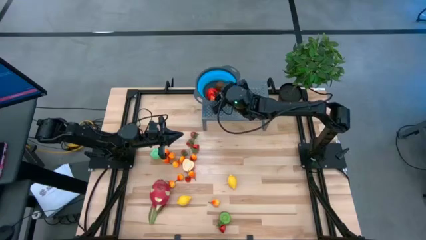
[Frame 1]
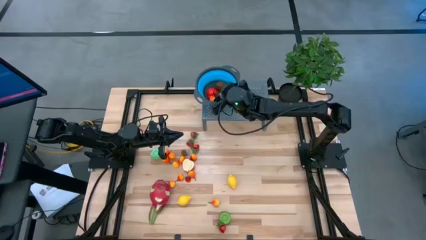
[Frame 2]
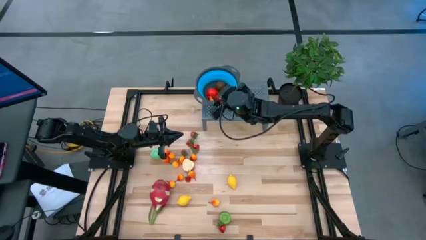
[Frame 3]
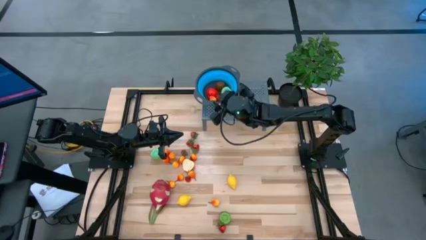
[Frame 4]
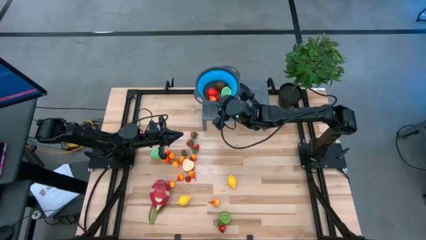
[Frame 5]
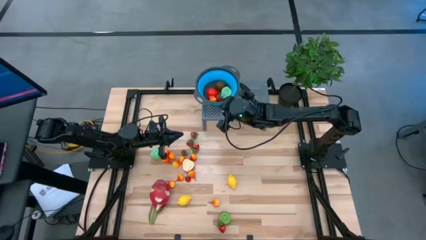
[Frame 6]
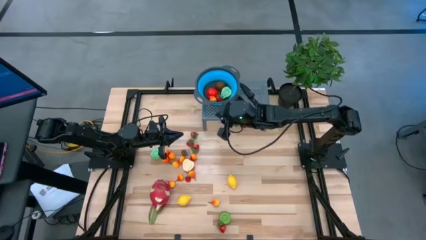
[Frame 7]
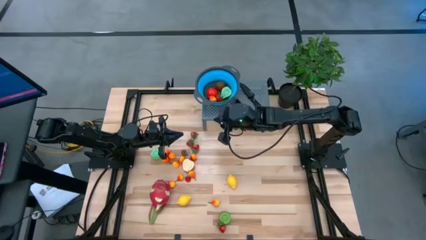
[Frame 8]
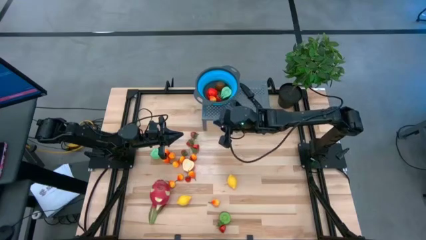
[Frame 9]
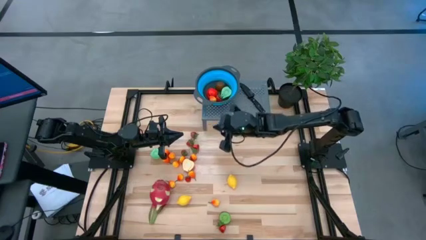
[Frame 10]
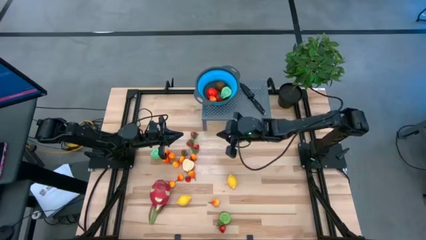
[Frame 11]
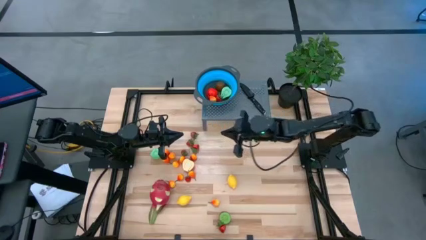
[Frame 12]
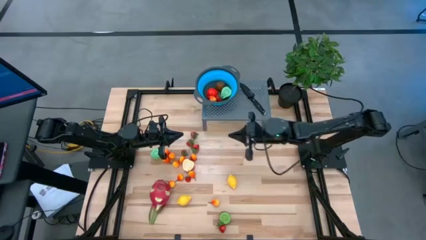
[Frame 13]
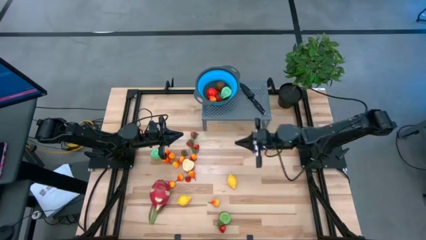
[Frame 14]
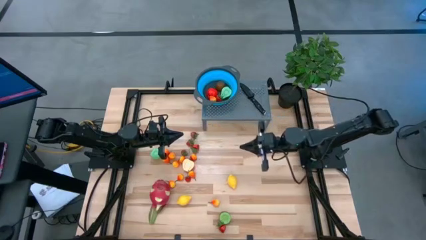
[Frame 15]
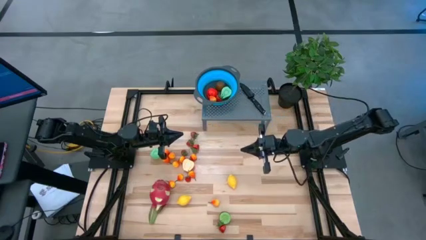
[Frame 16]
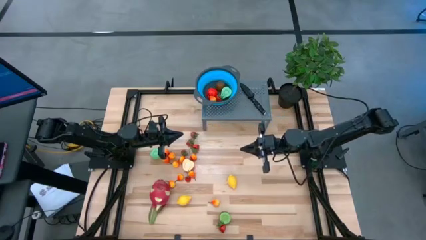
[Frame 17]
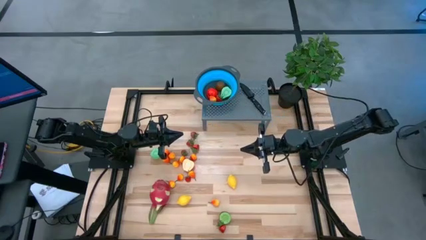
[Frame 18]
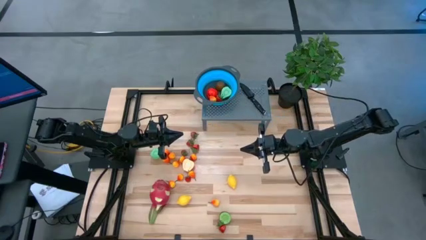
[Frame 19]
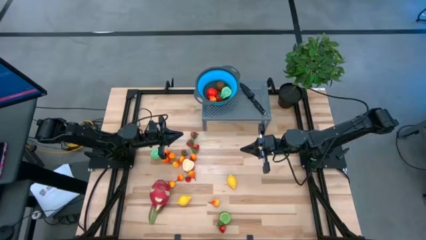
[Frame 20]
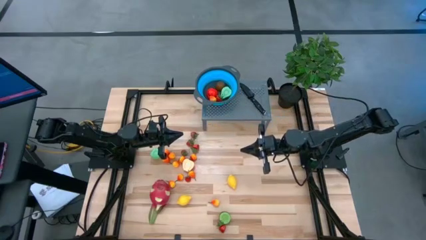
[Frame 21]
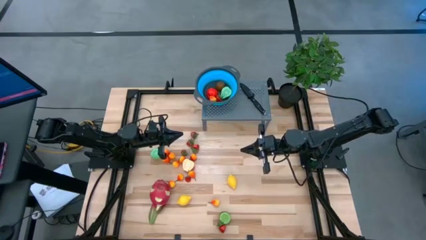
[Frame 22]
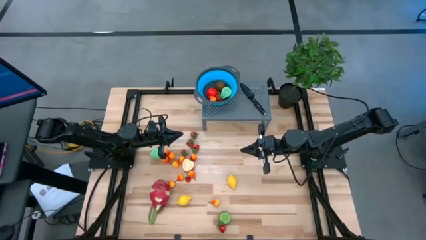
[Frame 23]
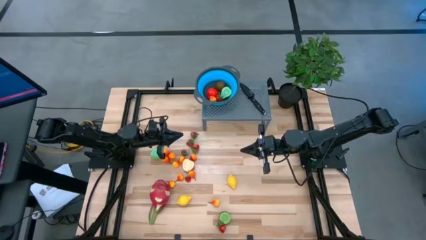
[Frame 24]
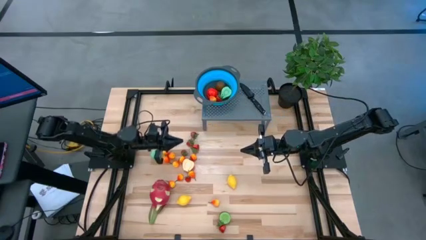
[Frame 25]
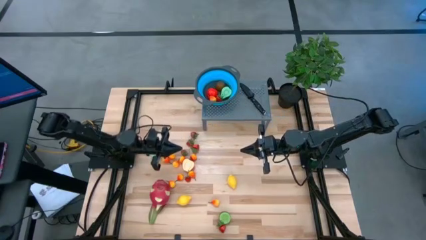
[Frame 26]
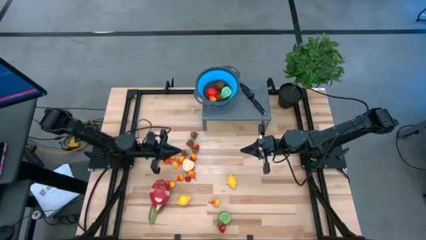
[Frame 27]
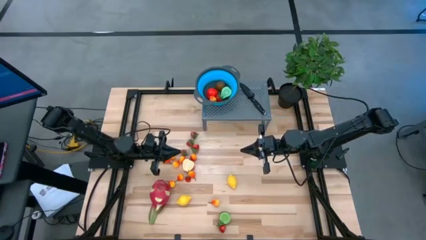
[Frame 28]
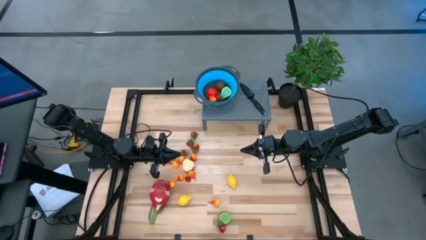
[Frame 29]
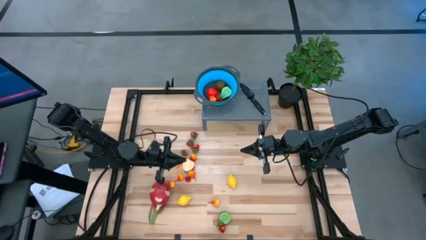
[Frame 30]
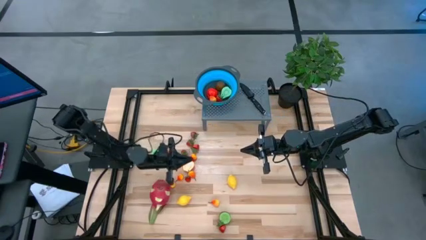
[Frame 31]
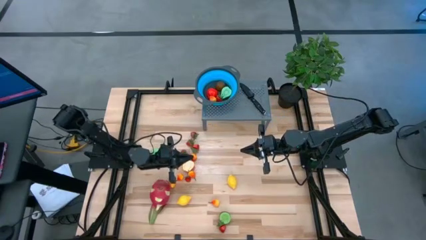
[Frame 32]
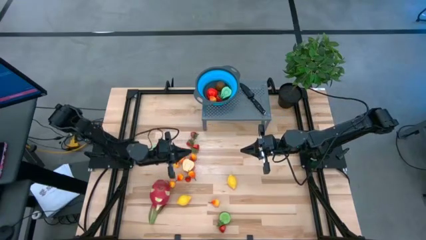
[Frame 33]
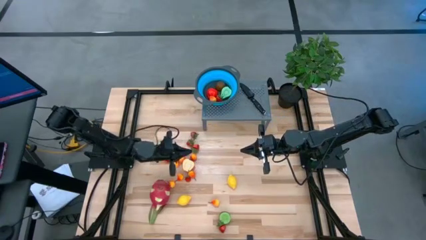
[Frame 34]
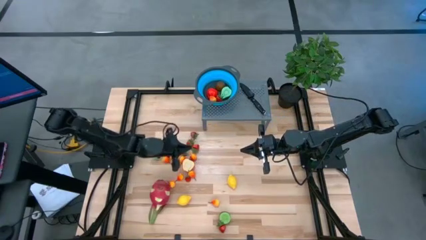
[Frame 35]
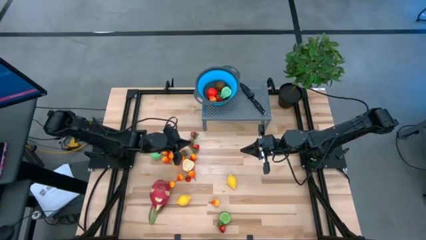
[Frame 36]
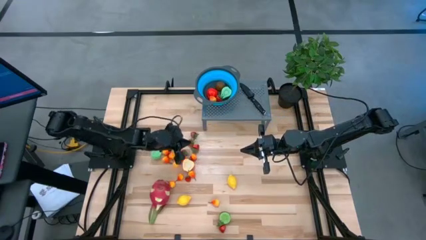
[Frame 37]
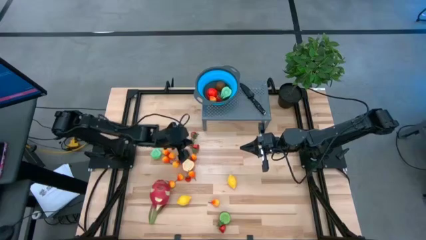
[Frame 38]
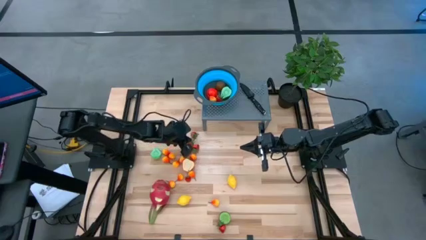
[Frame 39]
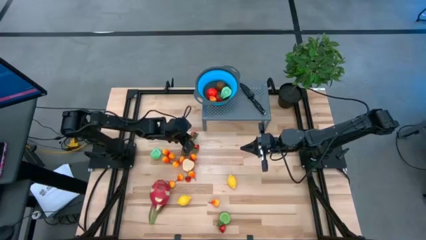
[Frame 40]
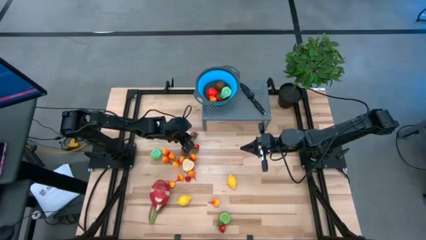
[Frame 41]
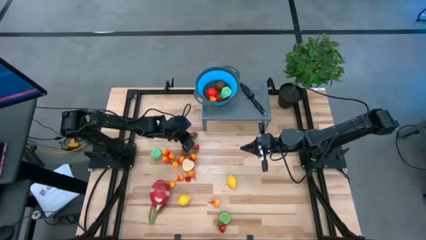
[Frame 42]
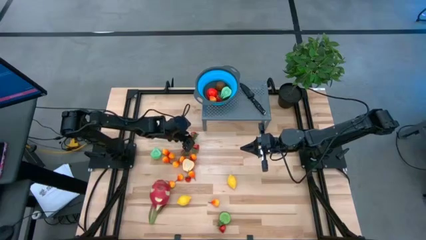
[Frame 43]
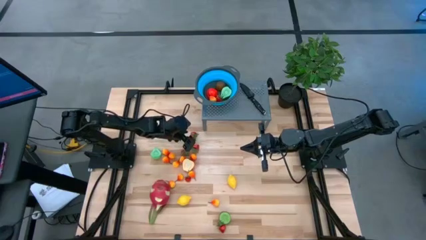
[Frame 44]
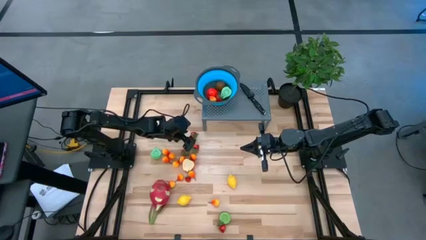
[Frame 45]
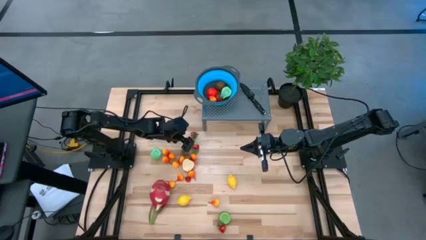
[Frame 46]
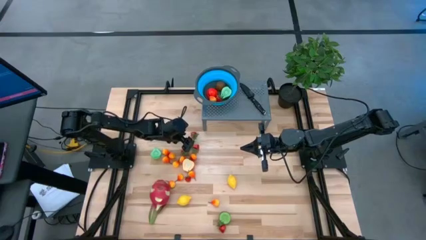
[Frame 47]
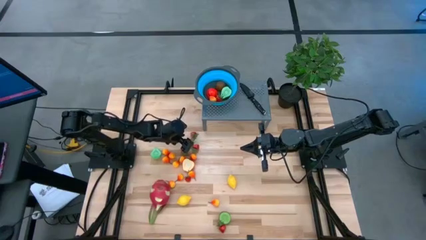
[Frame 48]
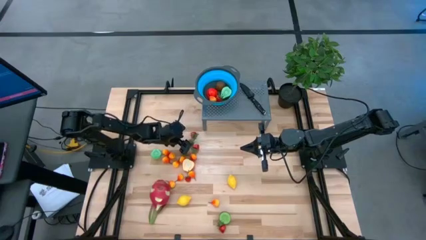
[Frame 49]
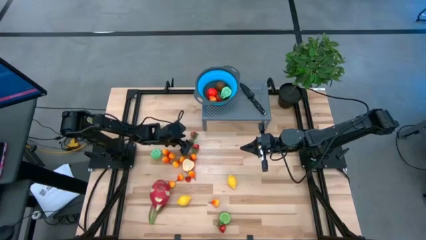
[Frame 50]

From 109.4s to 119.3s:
Task: Pick & Place Fruit
Put the strawberry into the strainer bowl

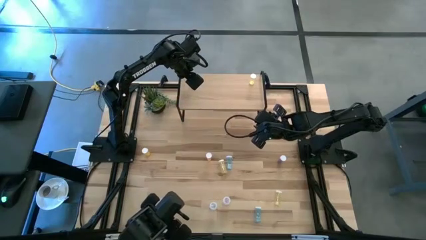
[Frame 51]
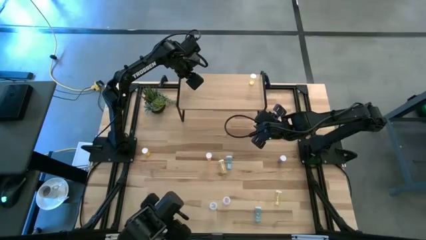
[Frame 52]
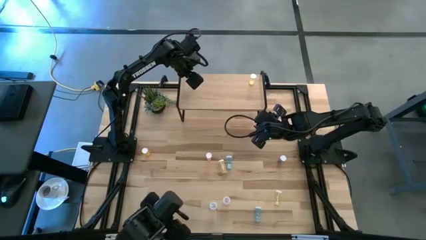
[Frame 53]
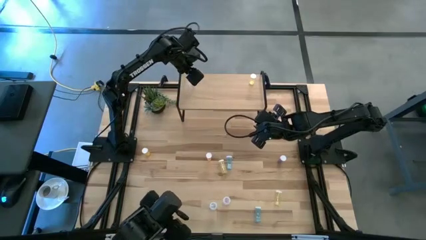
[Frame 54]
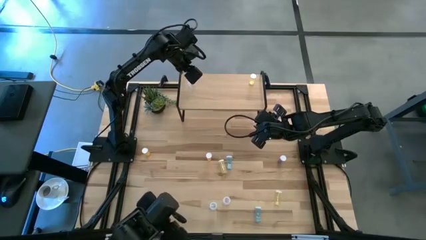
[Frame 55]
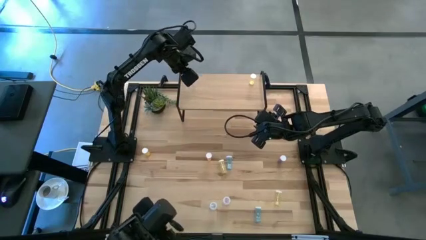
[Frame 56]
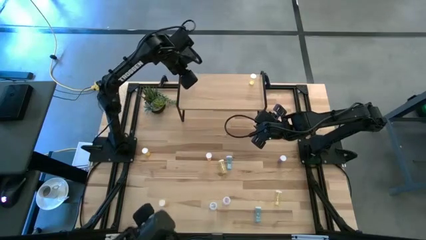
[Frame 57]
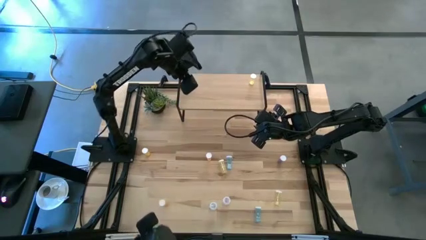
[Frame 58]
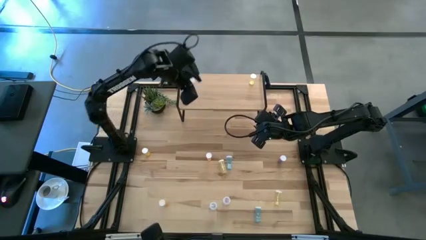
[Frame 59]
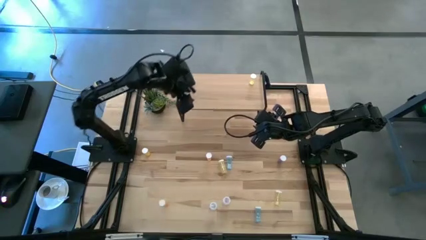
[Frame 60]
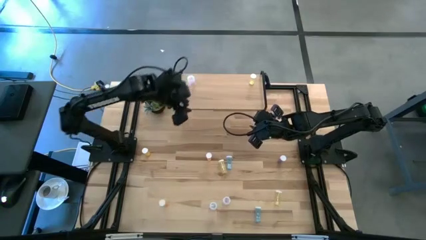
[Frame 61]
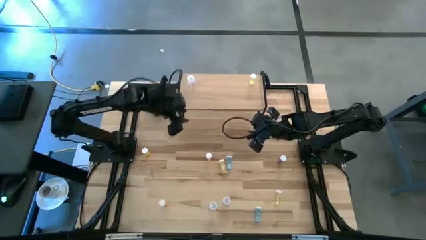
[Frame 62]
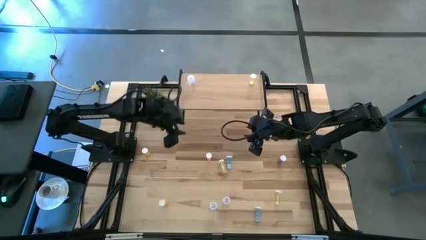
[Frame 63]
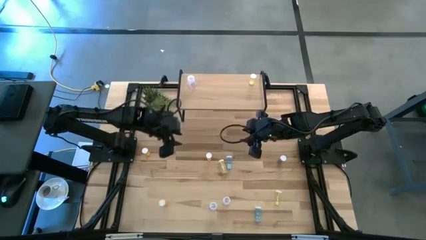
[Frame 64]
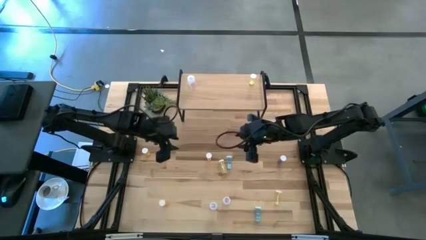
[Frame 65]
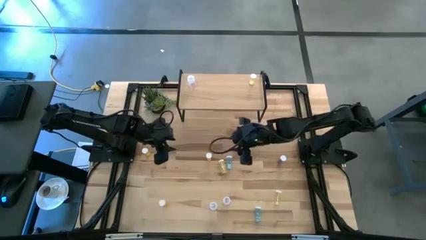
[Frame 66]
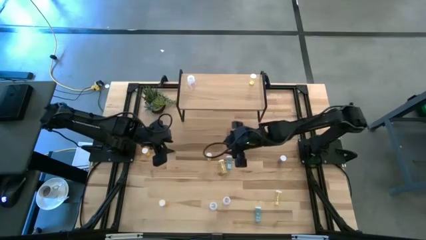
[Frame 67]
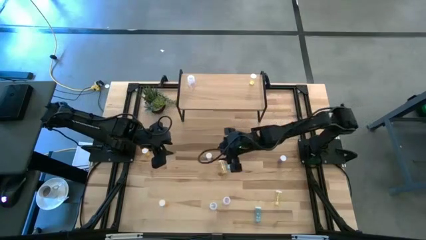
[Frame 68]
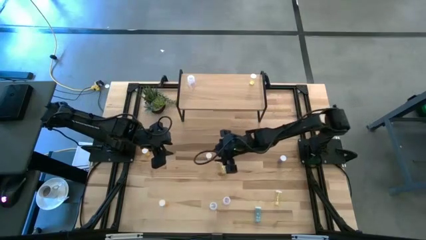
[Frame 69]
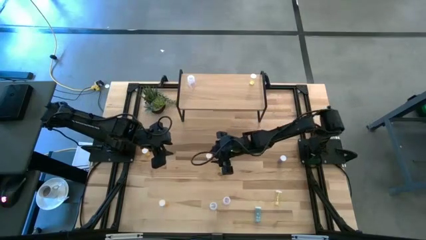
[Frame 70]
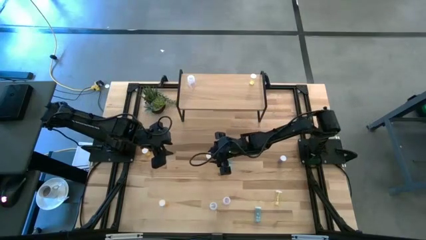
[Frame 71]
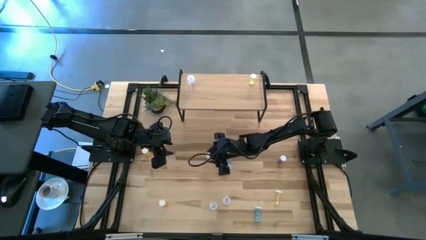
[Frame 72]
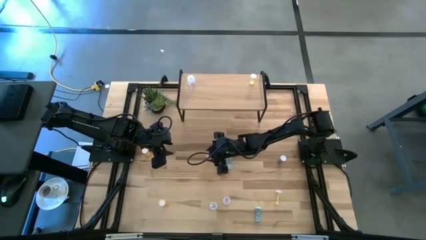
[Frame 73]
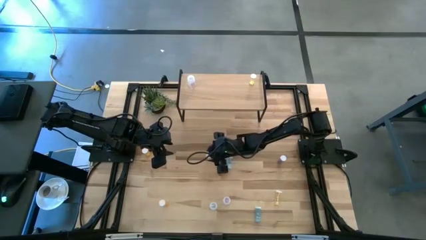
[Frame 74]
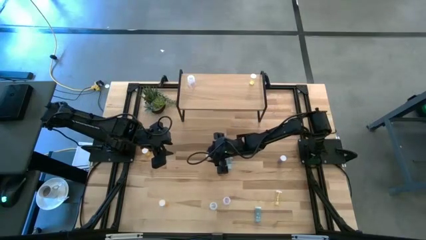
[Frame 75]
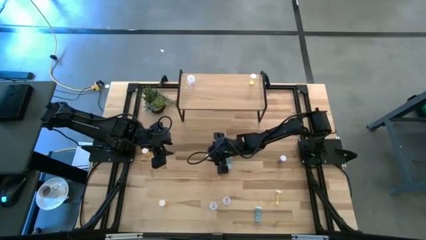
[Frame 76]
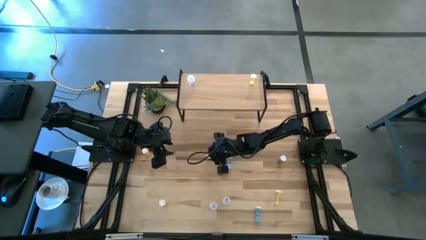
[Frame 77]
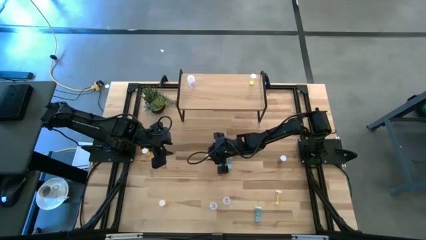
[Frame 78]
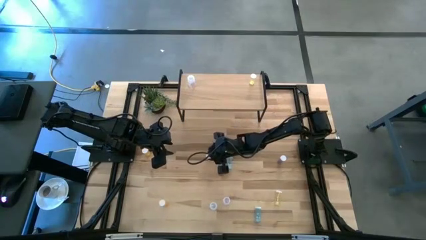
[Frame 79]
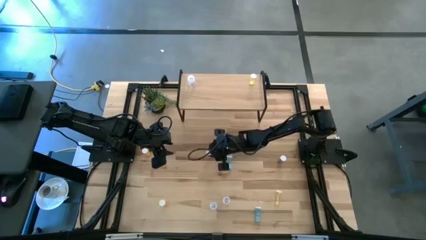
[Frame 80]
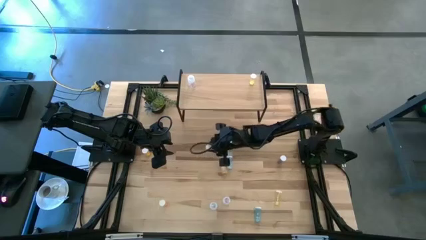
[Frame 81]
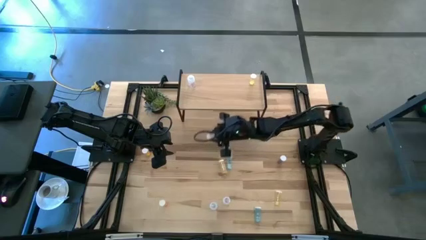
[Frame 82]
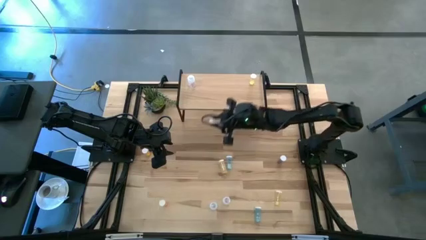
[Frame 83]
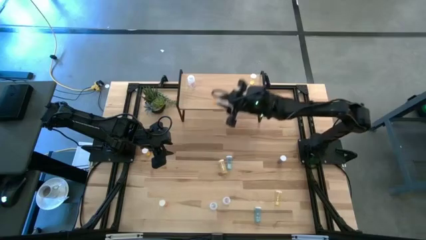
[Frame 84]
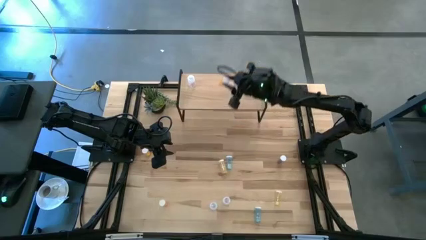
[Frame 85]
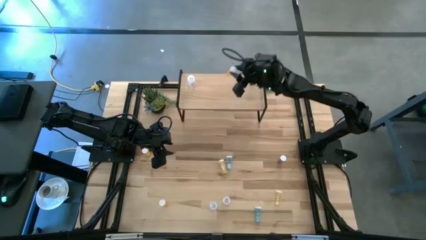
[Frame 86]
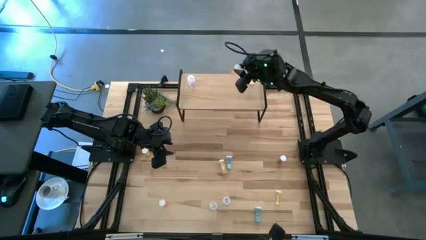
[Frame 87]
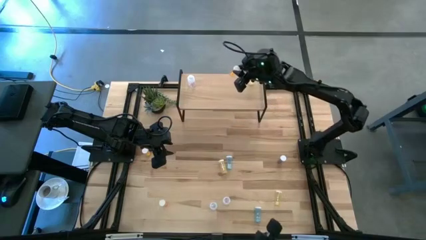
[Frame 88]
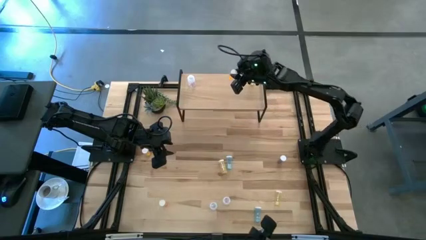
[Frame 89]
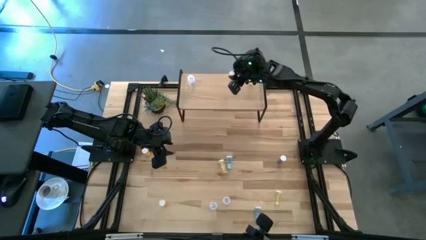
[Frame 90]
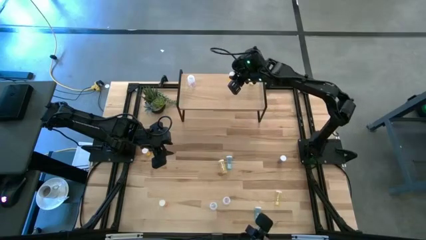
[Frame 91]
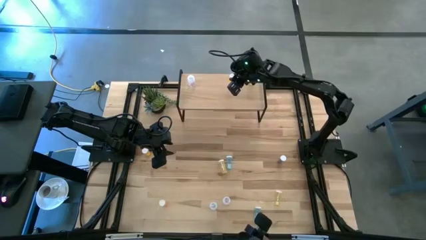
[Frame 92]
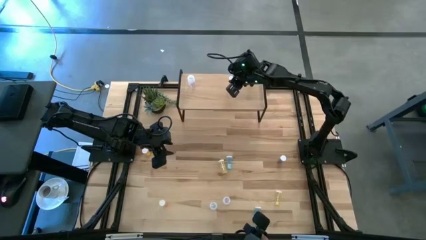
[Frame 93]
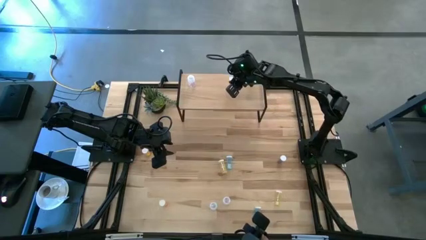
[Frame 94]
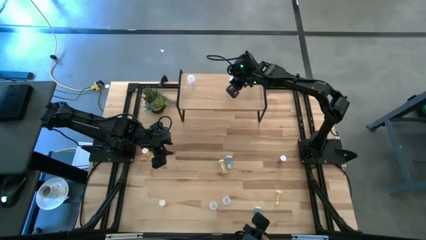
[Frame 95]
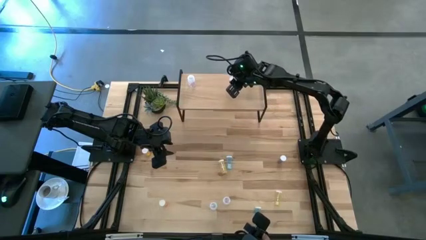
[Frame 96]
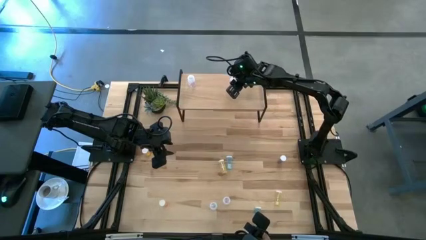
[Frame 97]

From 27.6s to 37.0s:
Task: Pick and place medicine bottles onto shelf by color
Put the top right orange pill bottle on the shelf
